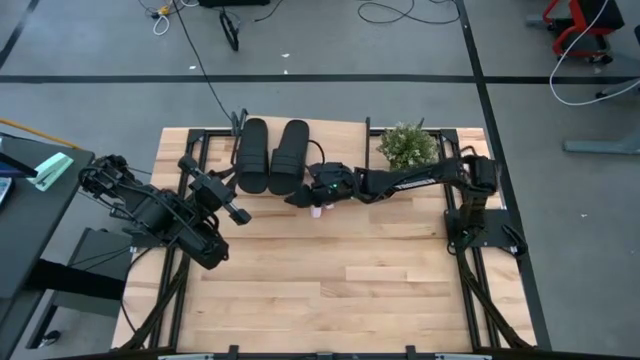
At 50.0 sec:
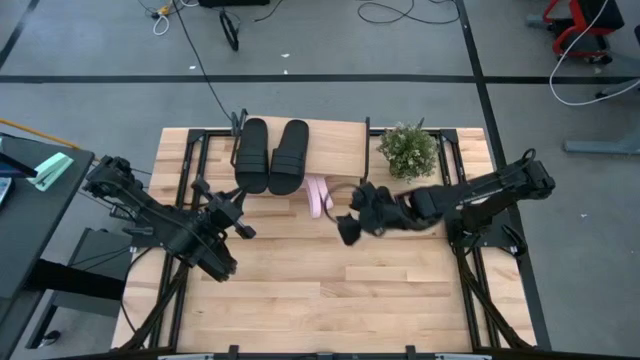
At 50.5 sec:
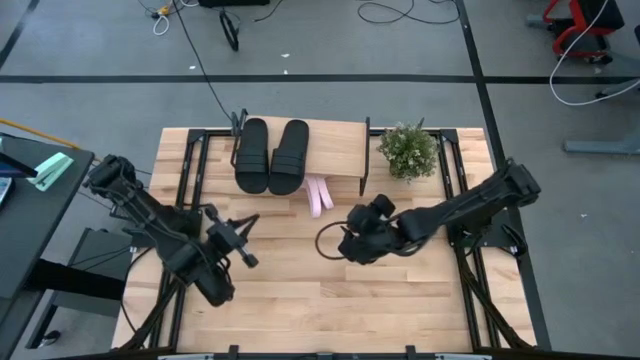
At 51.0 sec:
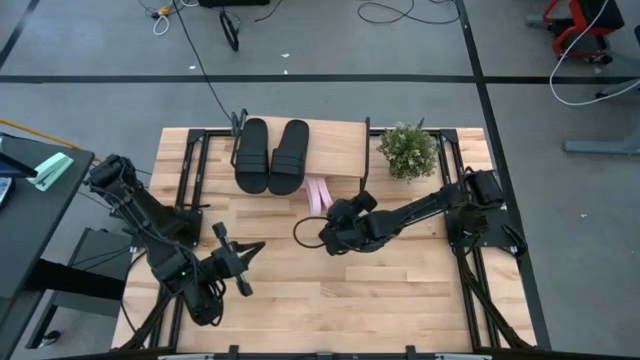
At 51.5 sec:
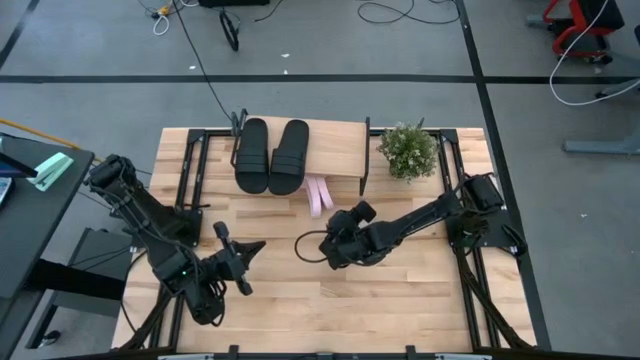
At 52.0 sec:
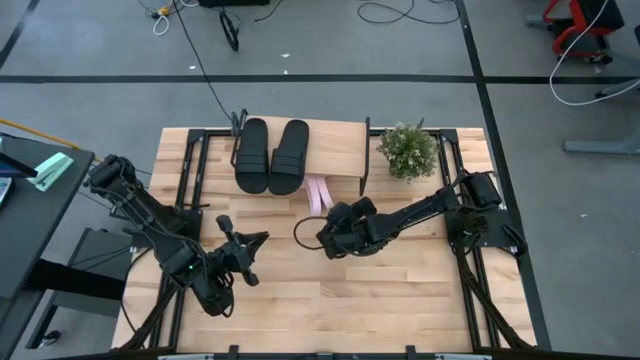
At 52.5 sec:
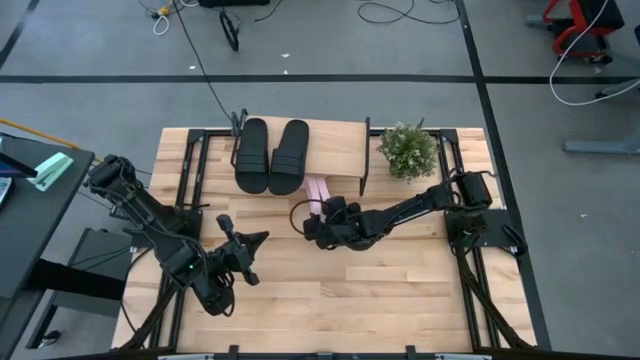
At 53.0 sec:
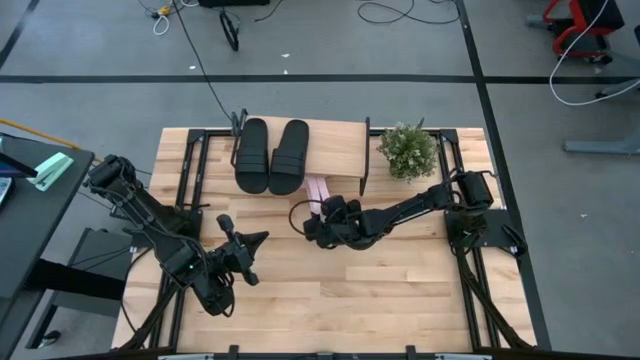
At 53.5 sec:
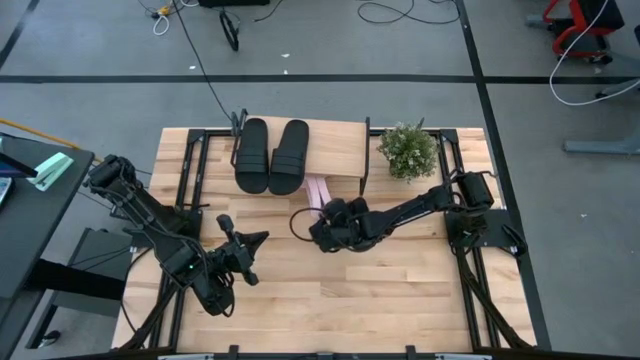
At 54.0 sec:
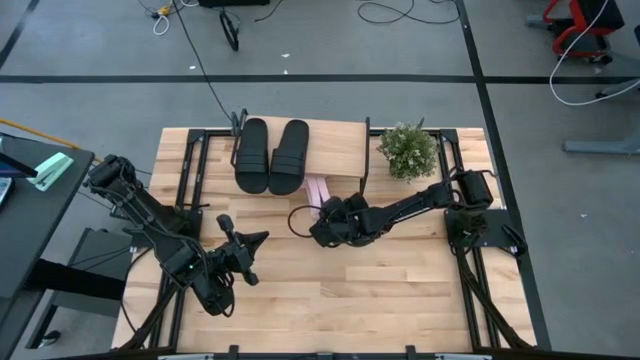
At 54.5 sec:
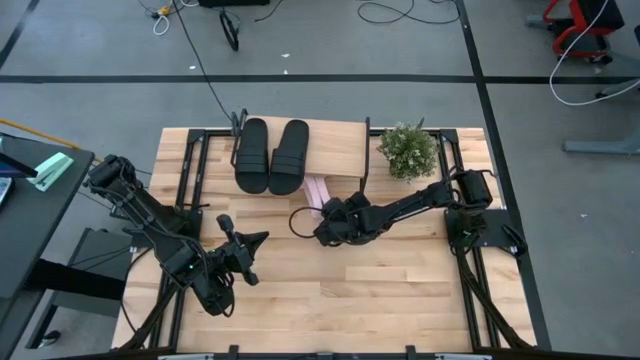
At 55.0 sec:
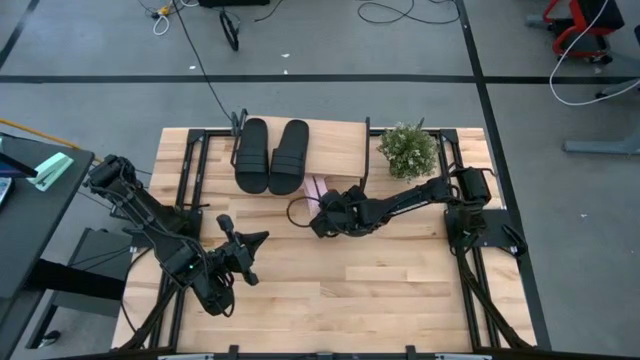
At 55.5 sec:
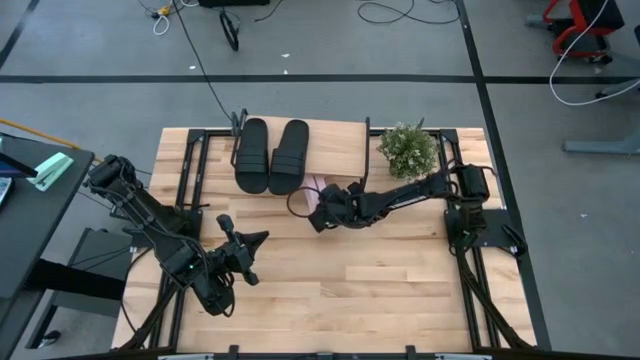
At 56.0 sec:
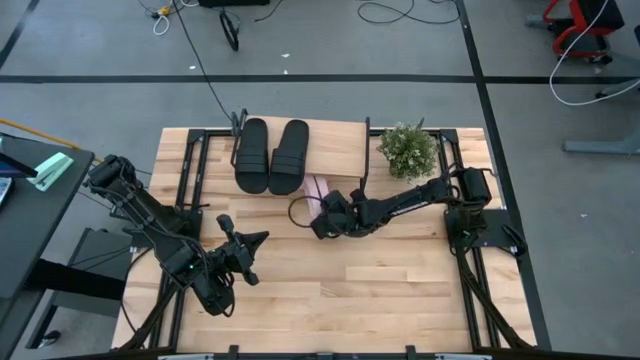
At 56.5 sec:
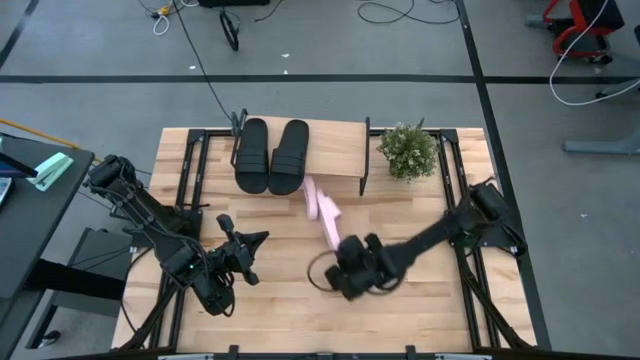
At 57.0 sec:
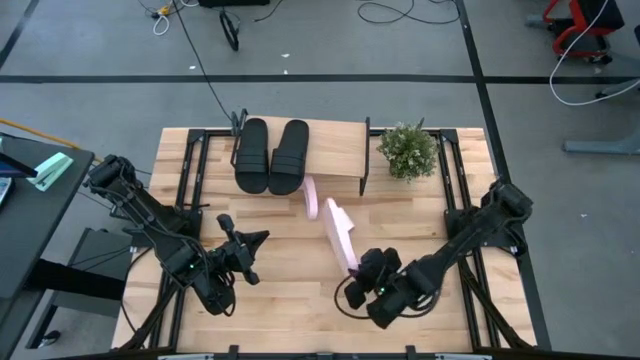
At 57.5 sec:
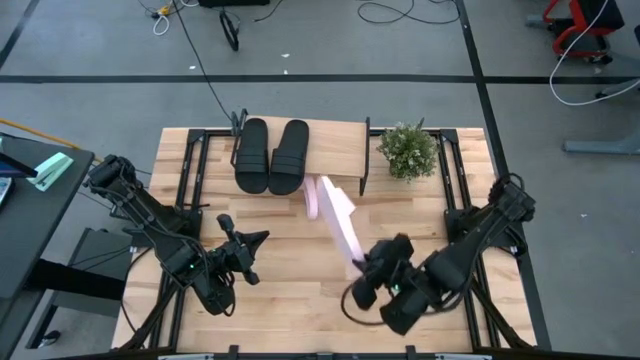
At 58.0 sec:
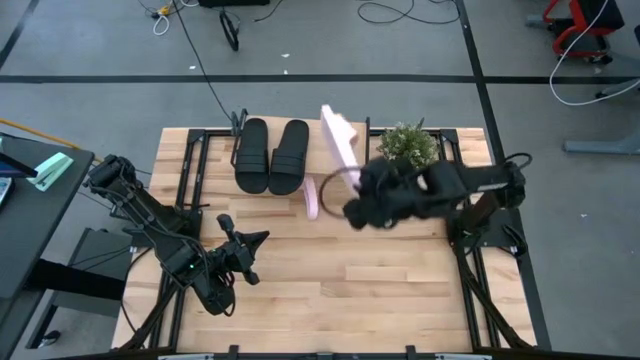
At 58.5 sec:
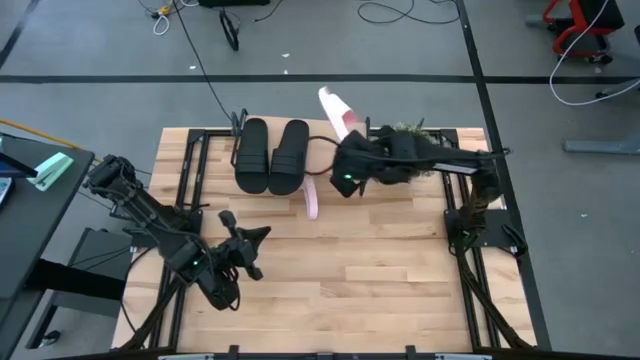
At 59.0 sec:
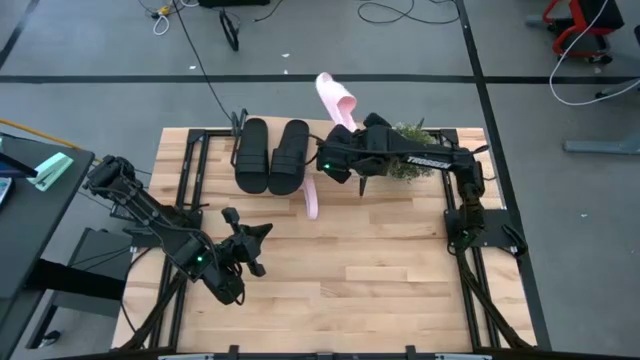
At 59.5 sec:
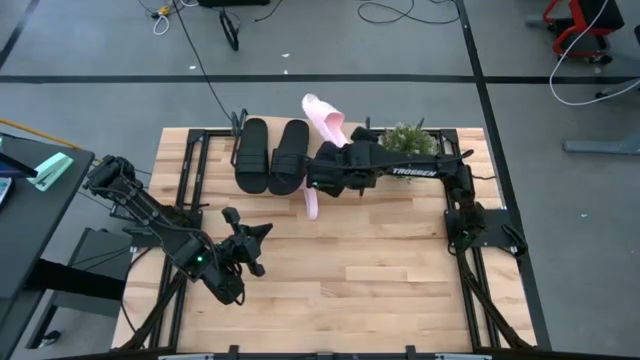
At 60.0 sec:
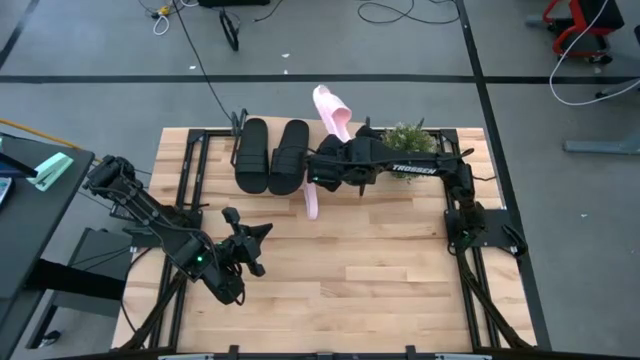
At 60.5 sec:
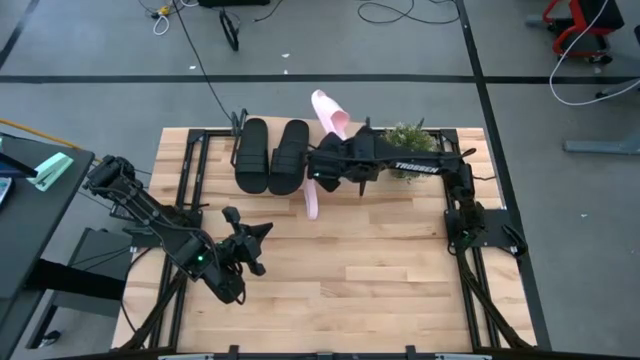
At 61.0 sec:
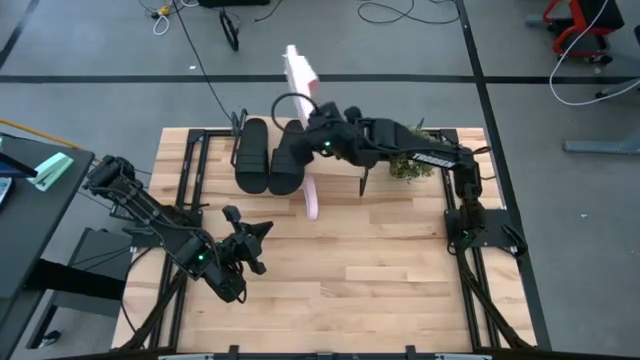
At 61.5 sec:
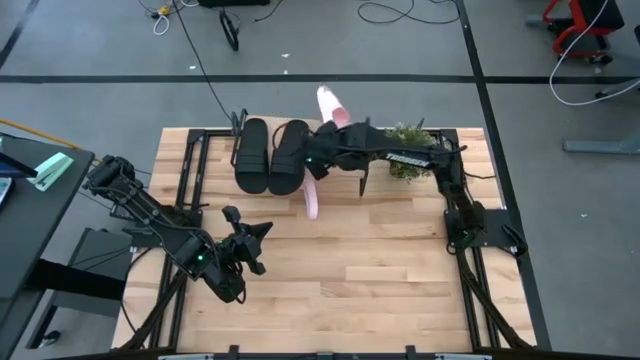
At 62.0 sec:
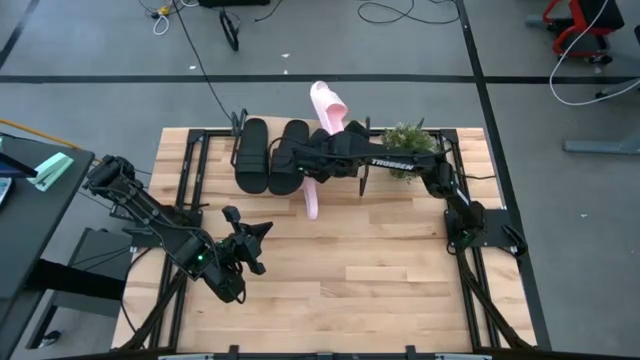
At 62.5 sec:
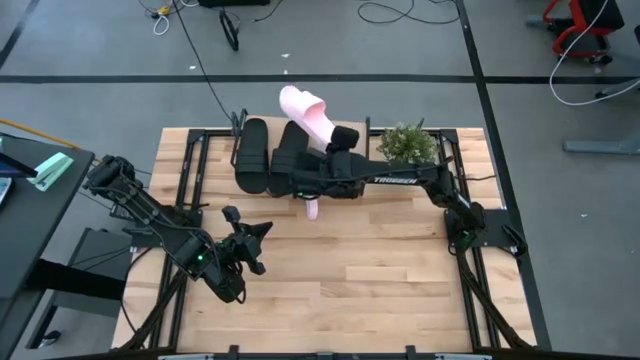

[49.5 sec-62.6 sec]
Task: Pick and place slides into the shelf
Put the right white slide on the shelf

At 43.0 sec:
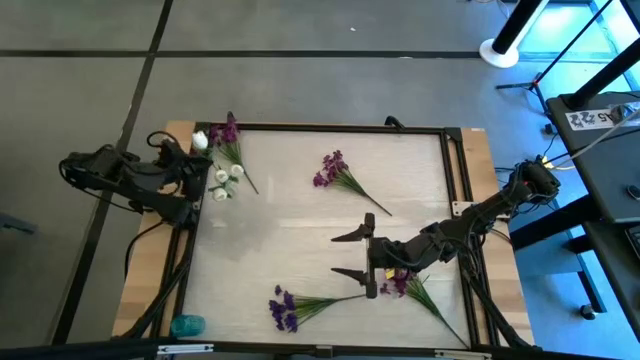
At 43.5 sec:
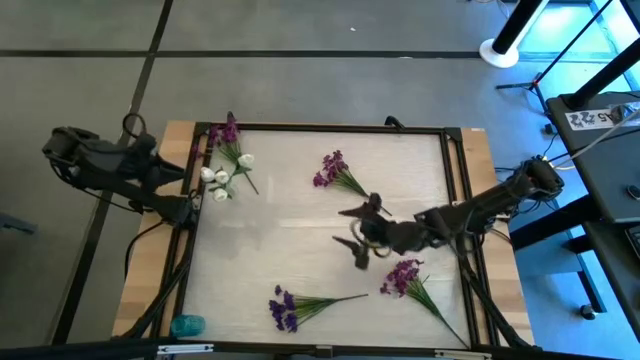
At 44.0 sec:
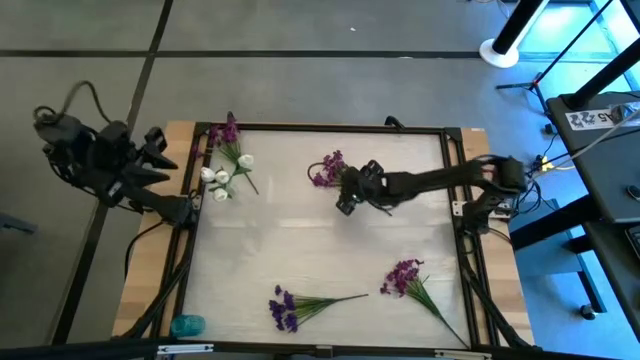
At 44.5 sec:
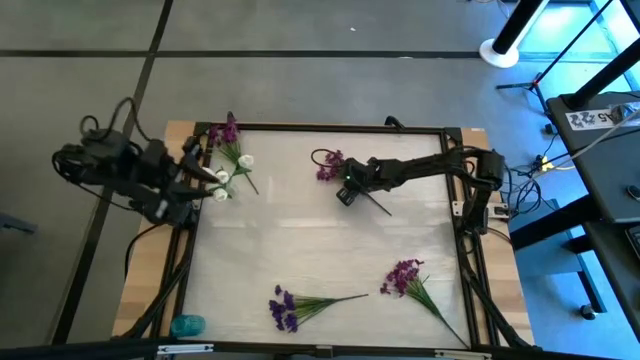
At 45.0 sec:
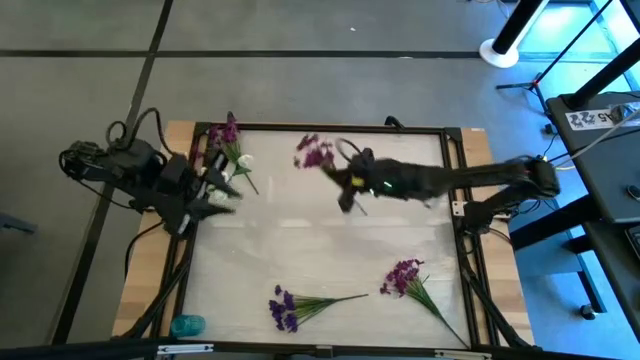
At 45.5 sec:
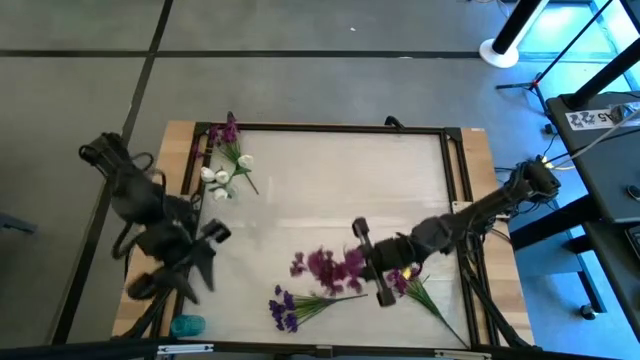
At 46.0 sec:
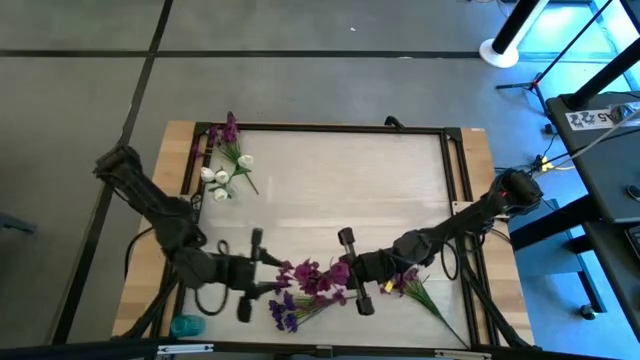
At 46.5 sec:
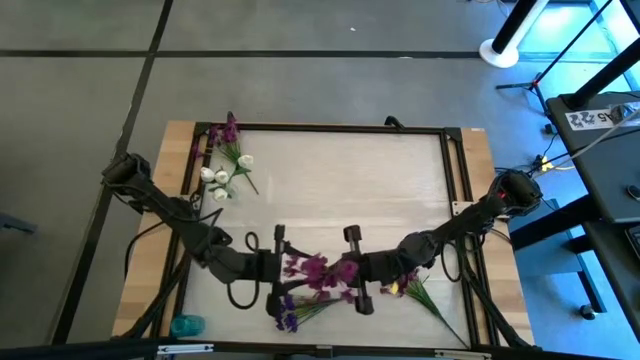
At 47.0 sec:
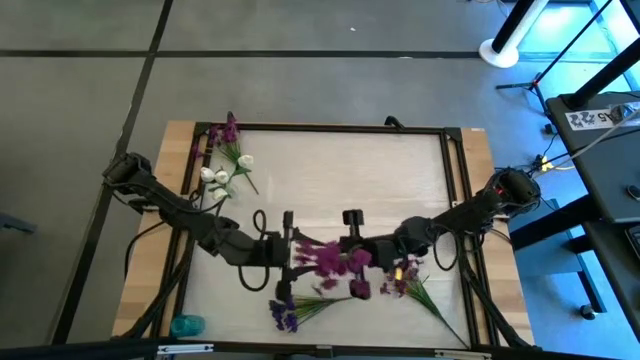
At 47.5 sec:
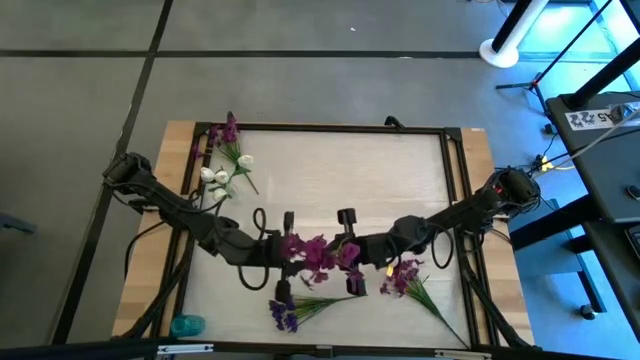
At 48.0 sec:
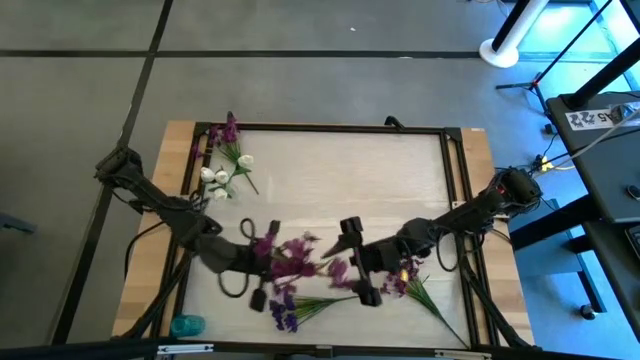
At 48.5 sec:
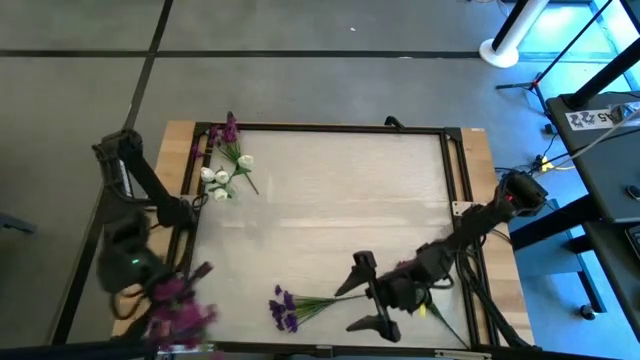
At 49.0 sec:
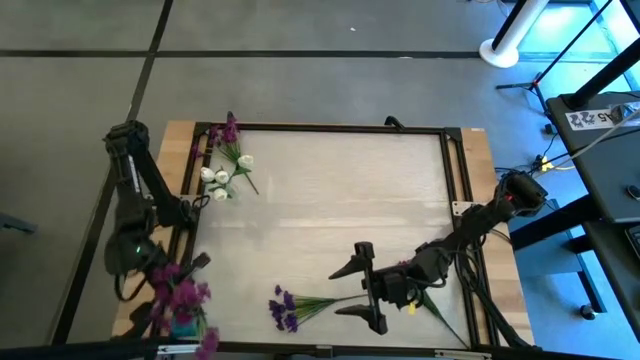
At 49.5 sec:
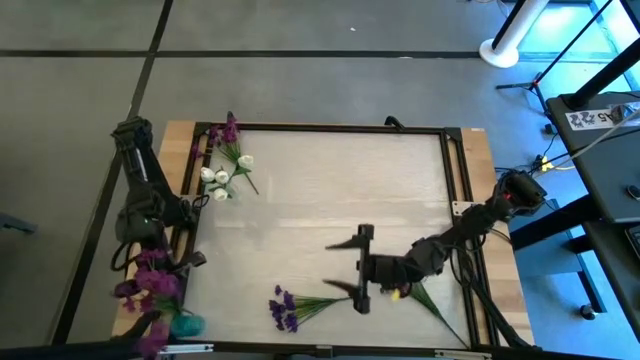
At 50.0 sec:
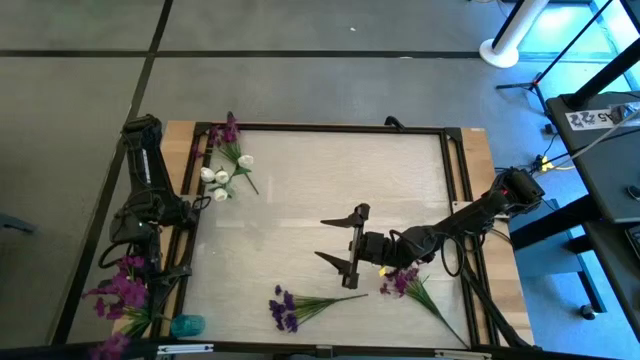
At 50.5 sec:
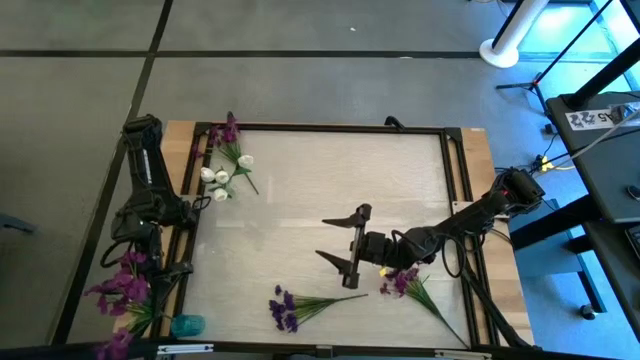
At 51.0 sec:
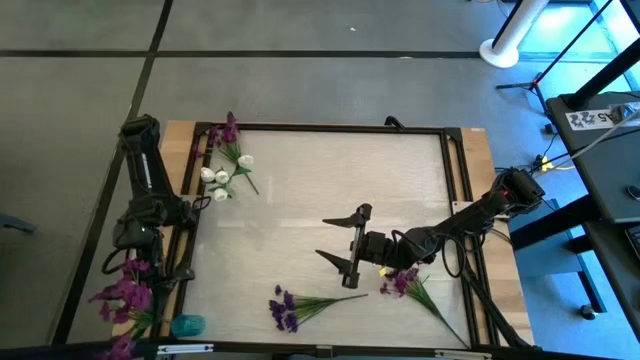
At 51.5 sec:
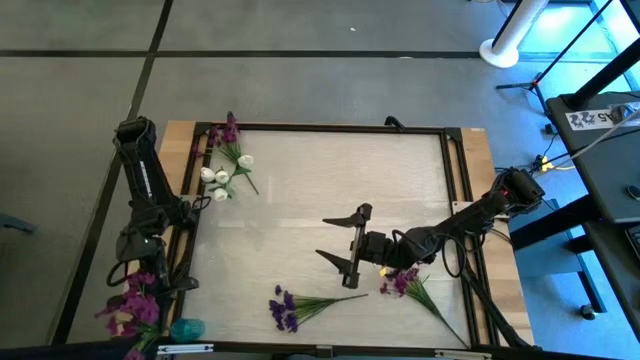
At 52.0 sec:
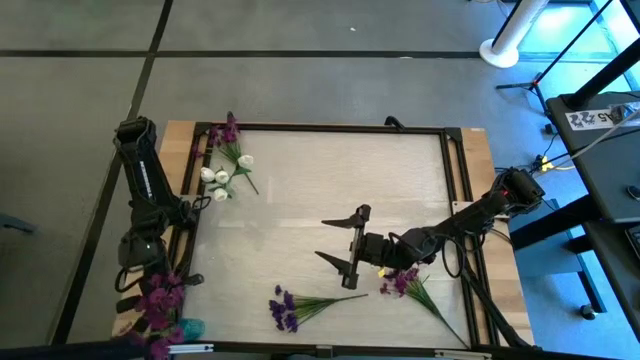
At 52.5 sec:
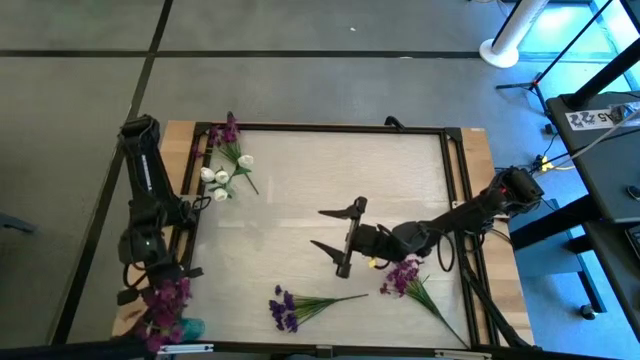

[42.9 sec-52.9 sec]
Task: Sort flowers into vase by color
Put the violet flowers into the transparent blue vase
